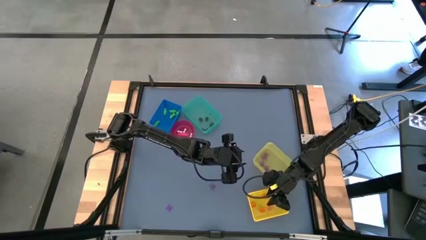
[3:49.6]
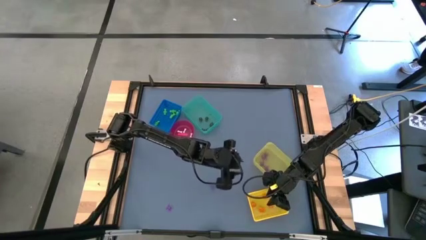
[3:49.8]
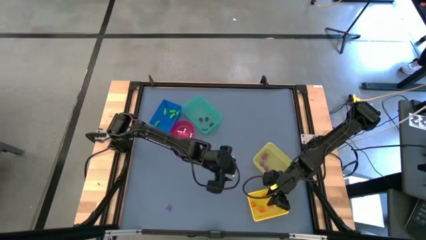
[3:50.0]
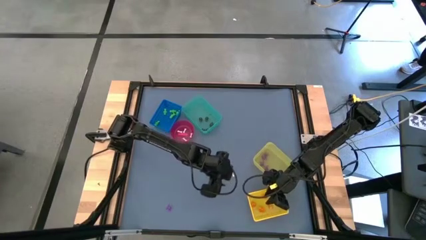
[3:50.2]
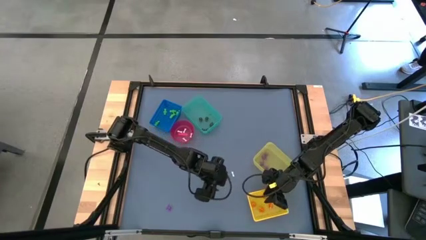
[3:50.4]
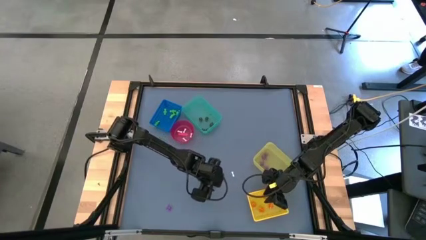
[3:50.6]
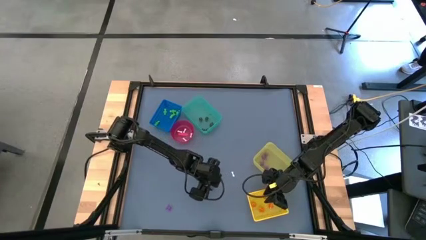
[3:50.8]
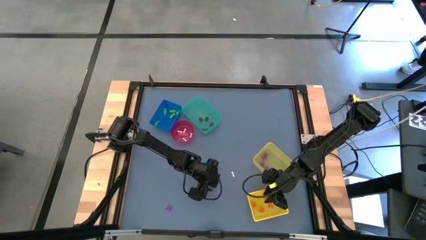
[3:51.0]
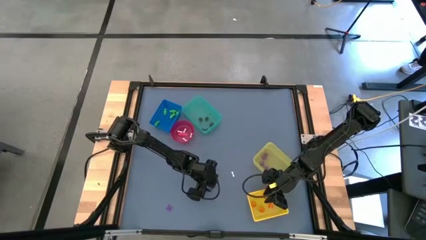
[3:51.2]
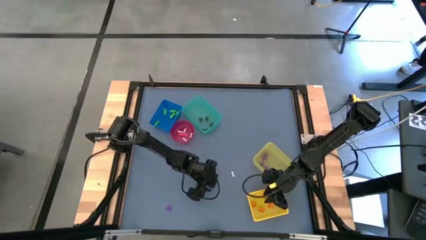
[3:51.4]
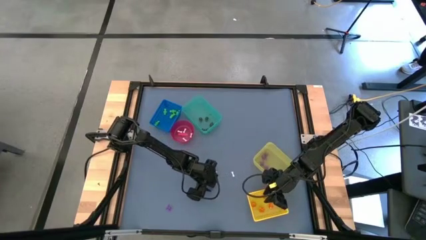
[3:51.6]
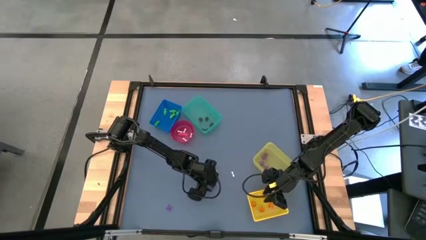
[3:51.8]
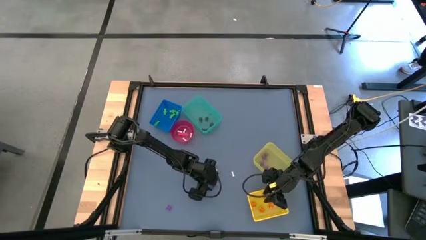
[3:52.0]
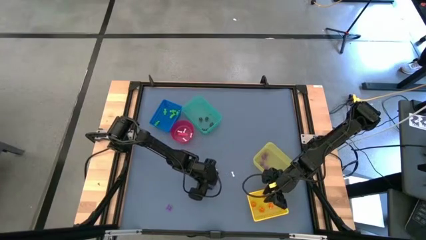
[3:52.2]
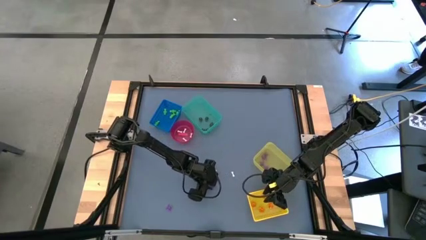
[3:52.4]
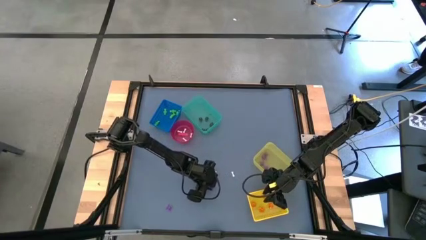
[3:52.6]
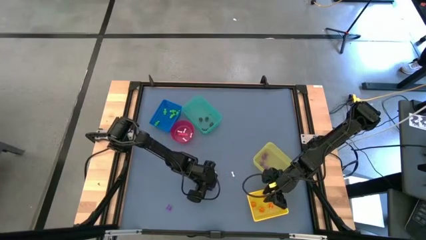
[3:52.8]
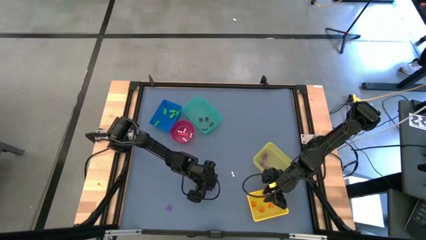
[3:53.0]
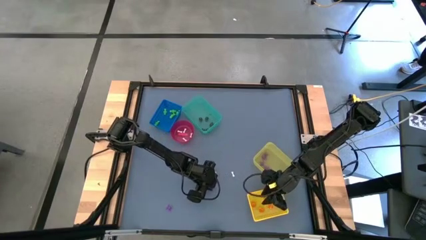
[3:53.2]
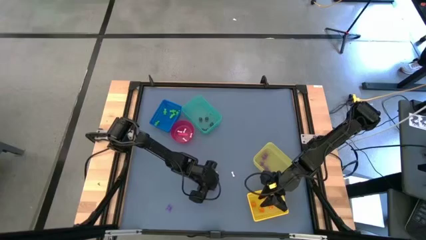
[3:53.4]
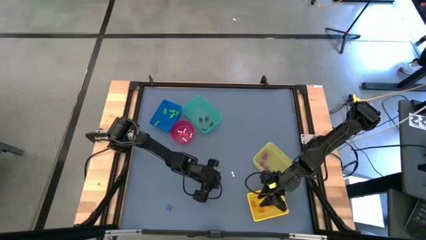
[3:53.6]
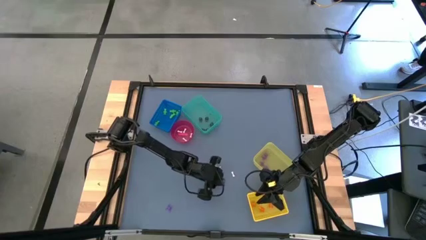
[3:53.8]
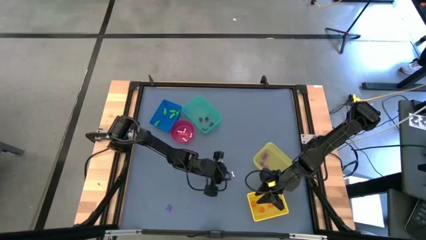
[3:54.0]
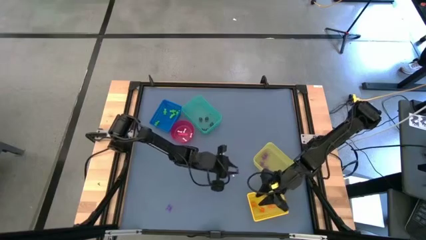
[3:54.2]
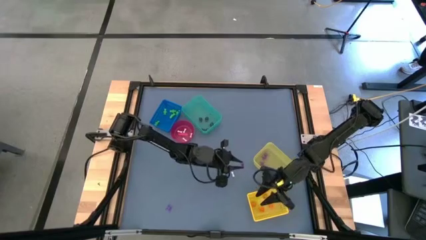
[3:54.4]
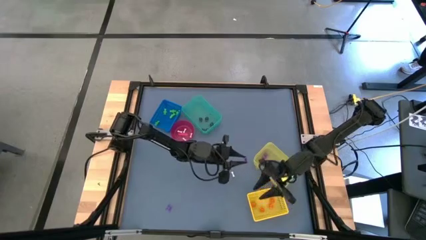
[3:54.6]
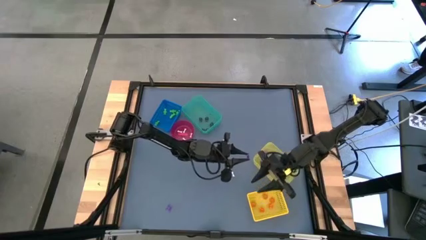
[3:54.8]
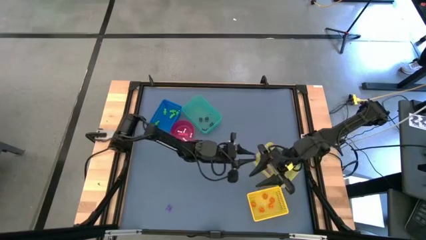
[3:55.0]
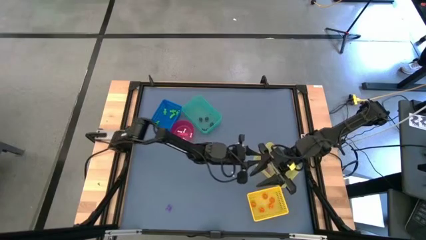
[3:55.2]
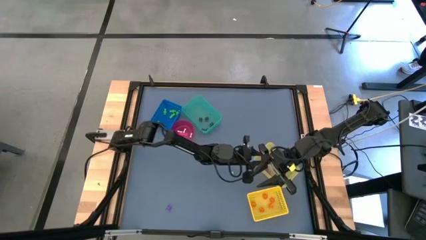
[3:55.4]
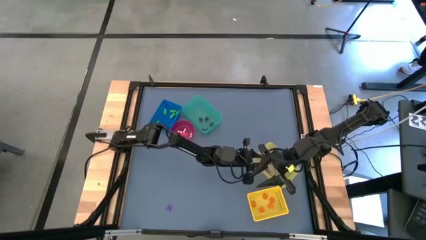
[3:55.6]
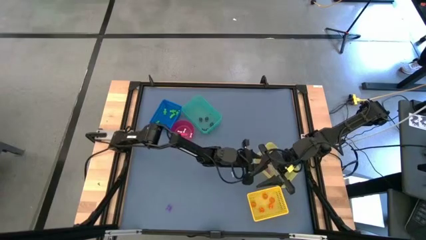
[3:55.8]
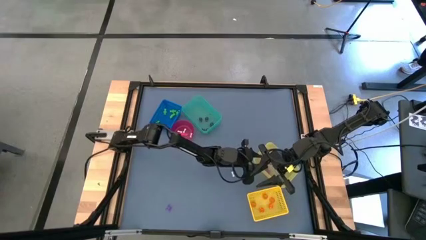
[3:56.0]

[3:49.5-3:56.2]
Task: Sort Halloween decoration
Put the purple spider toy into the yellow bin

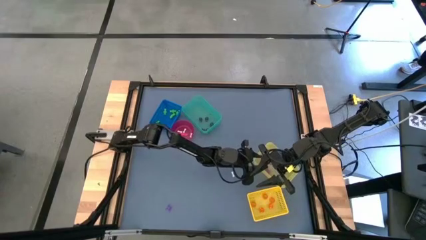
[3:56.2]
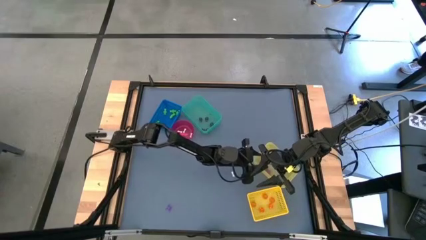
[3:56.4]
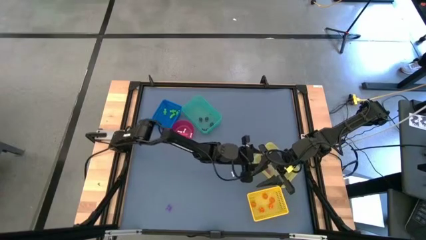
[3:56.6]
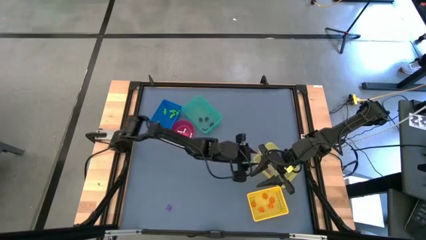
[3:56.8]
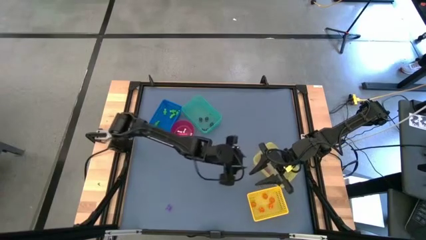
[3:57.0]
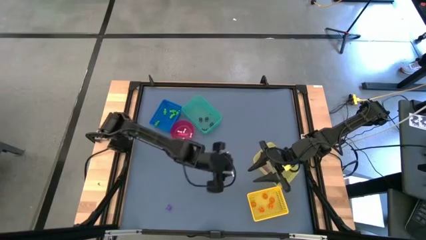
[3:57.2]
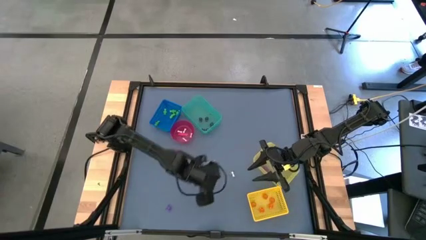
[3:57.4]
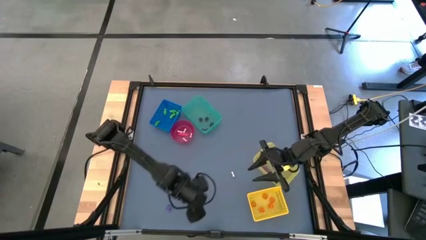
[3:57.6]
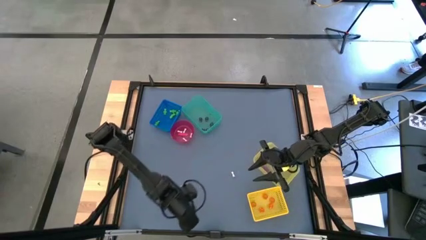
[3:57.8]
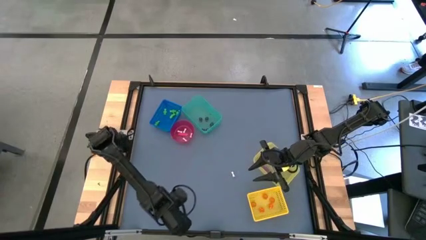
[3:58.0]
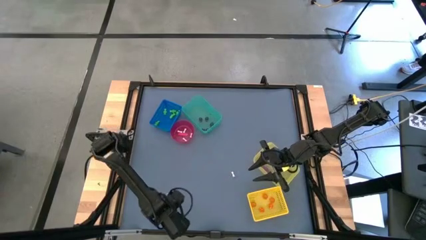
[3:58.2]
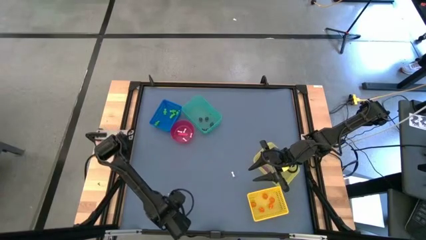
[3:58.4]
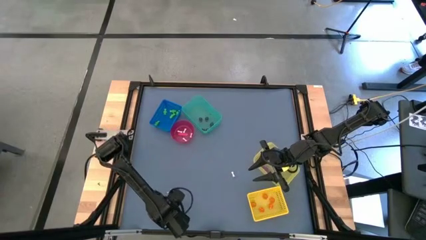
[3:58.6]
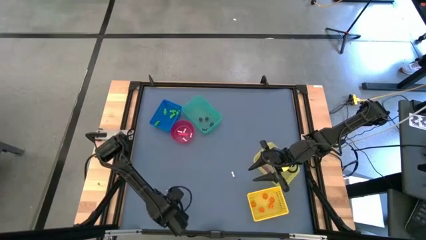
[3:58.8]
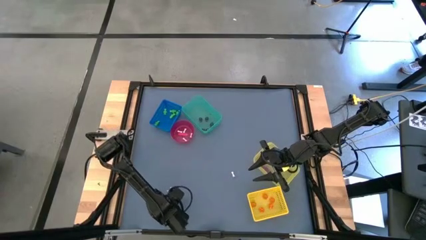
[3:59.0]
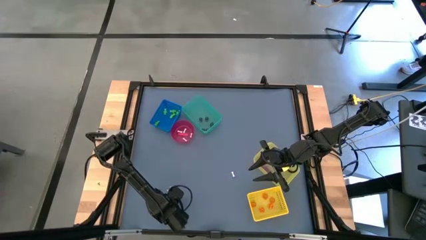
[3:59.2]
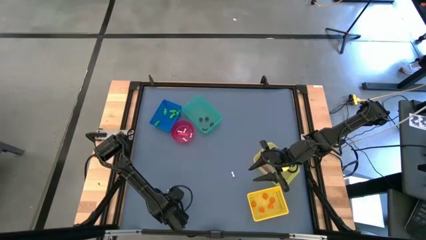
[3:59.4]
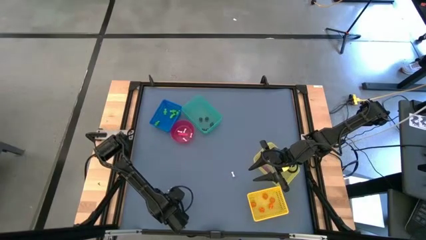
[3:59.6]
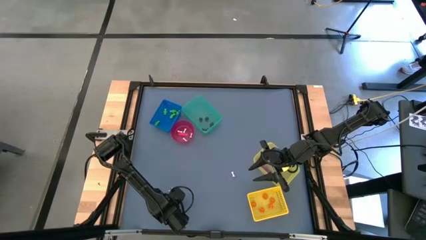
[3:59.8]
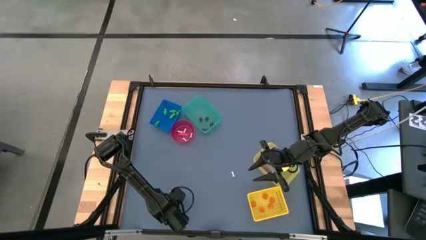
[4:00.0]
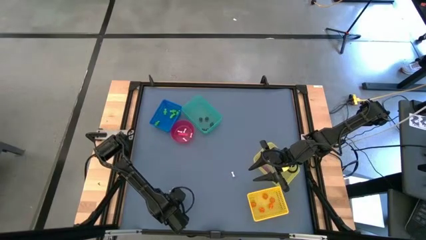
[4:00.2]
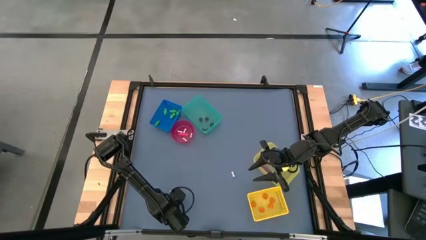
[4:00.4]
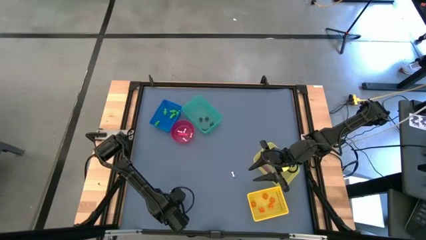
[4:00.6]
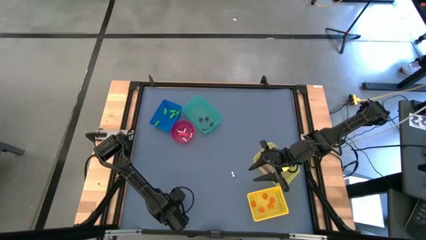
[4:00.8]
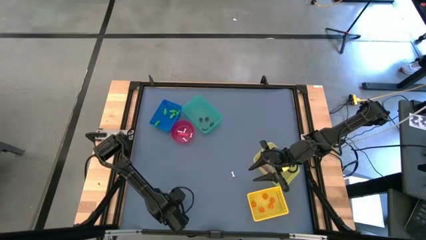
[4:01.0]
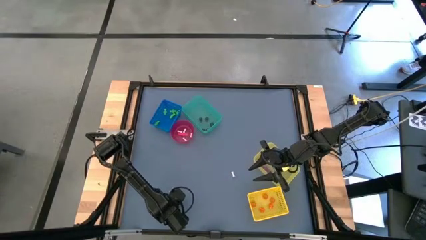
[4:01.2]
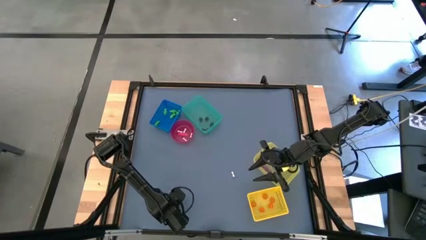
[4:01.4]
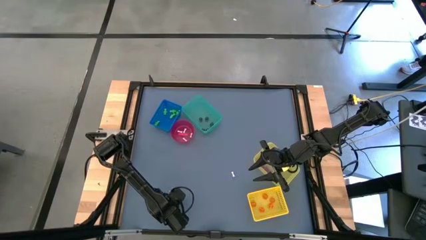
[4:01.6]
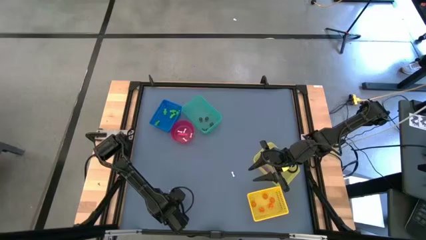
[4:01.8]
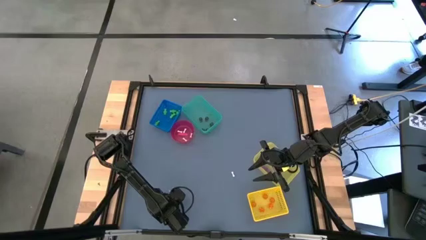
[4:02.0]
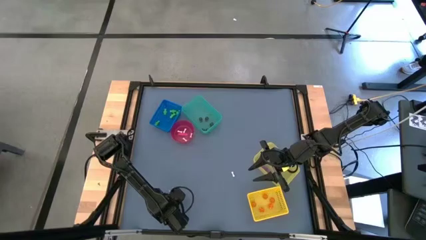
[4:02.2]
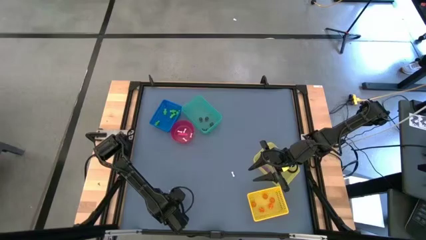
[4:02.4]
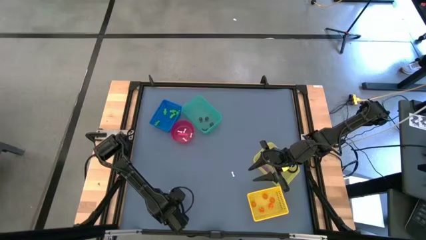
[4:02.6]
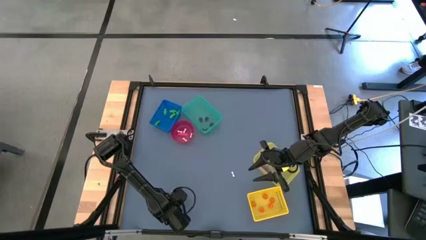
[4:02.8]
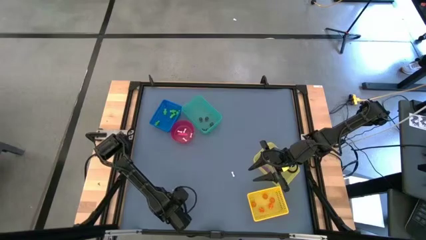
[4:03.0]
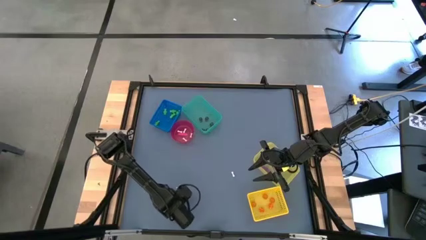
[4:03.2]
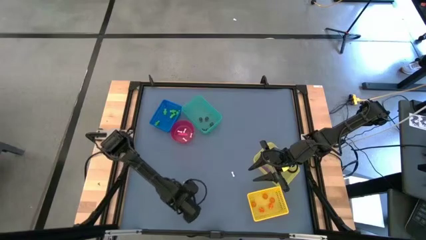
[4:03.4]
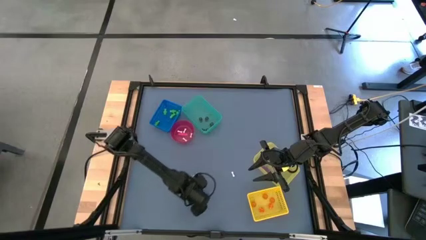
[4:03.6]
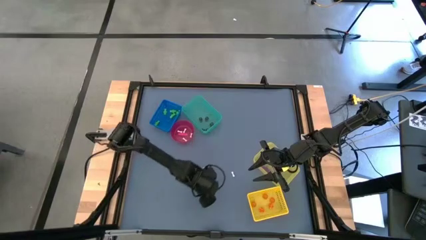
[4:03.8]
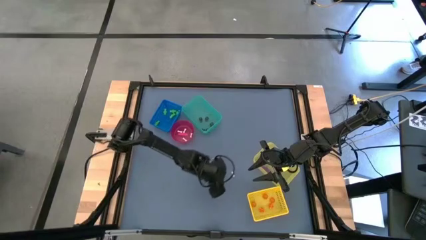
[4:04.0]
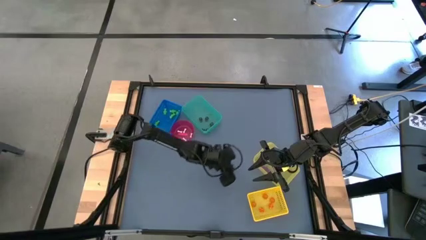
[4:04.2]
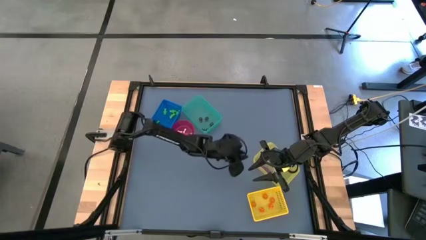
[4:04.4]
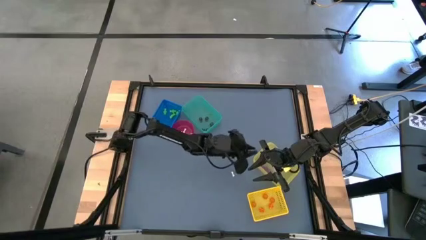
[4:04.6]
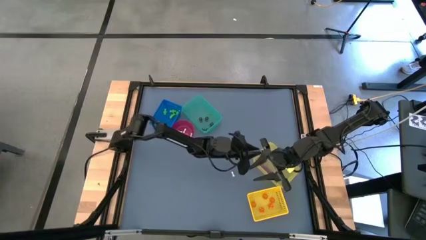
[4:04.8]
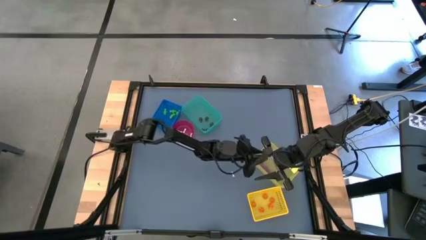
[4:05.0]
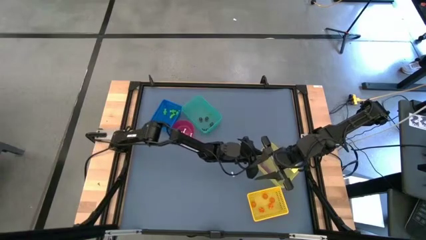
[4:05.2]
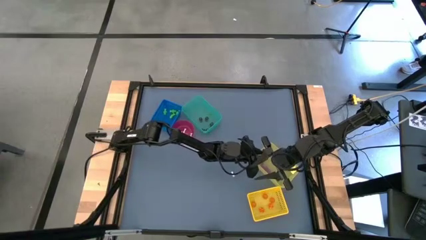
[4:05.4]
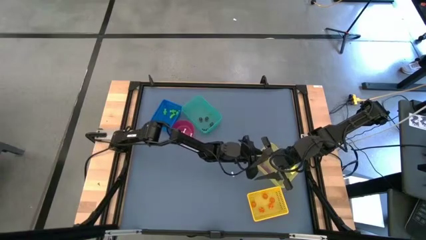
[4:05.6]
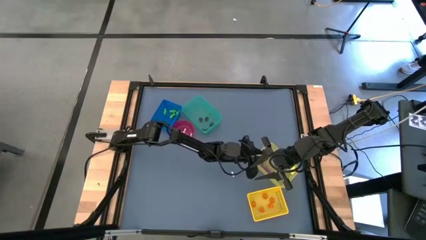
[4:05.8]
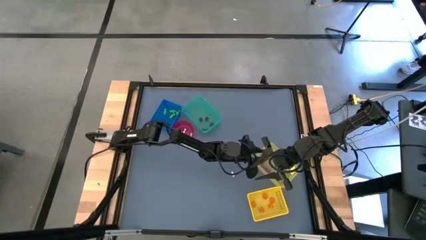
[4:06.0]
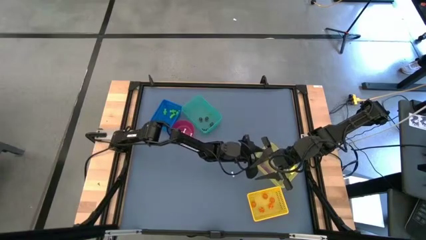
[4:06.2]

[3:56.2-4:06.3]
Put the purple spider toy into the yellow bin
